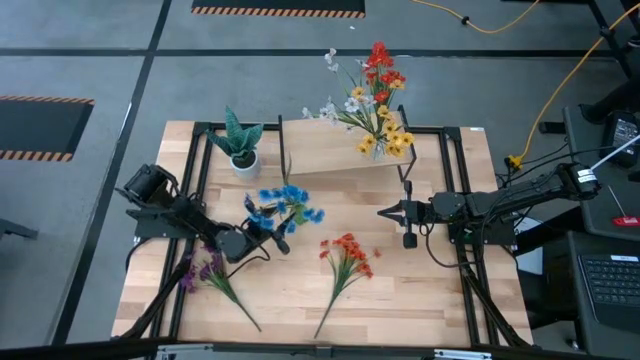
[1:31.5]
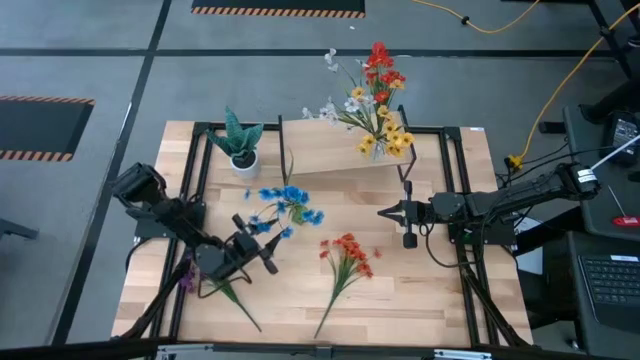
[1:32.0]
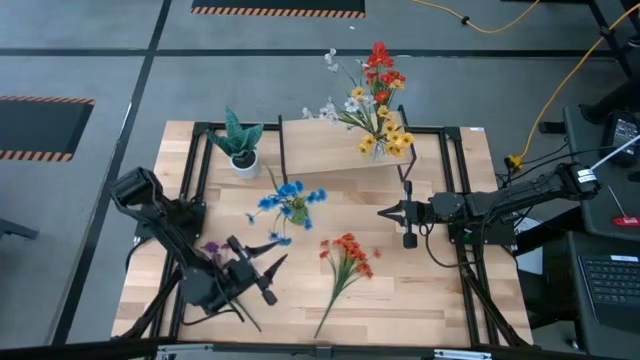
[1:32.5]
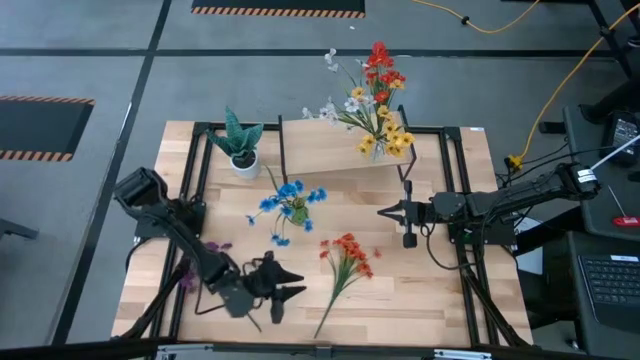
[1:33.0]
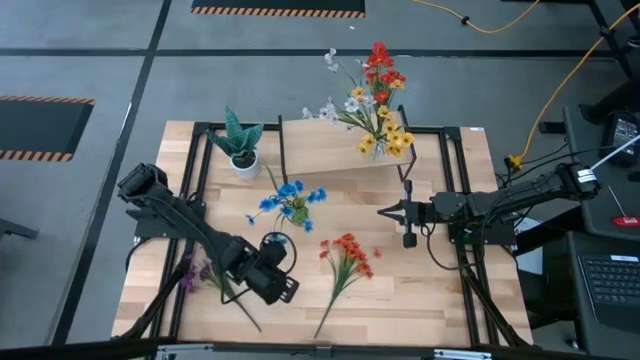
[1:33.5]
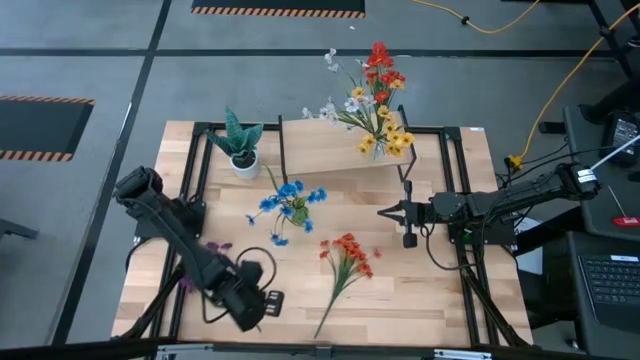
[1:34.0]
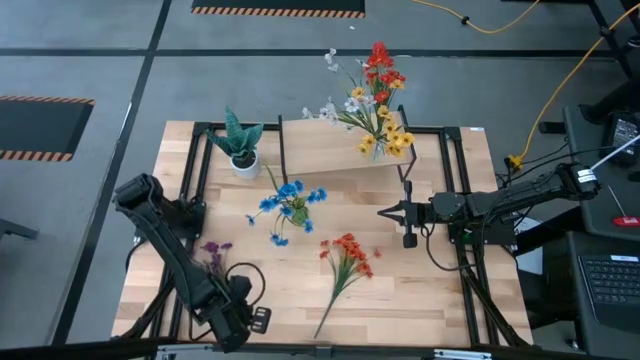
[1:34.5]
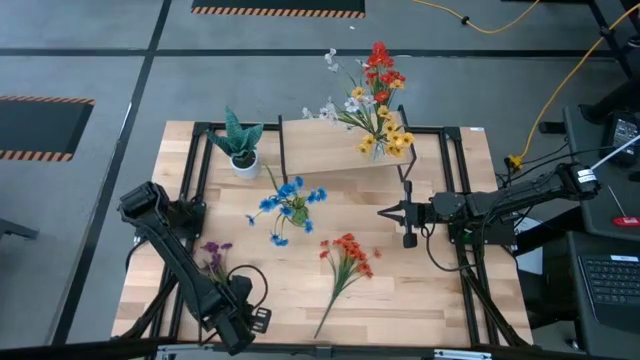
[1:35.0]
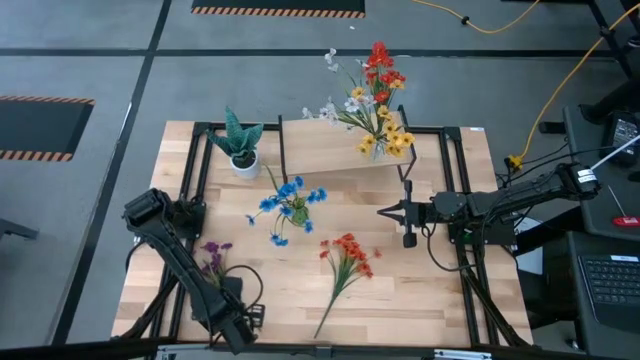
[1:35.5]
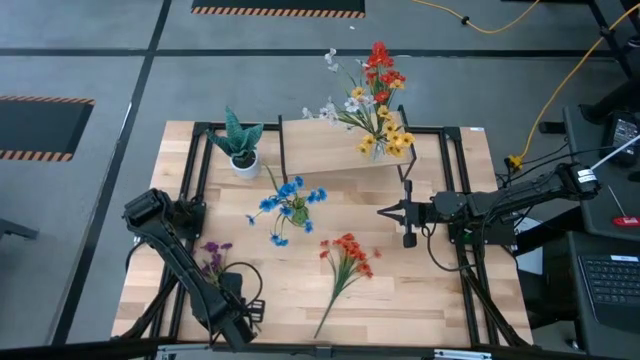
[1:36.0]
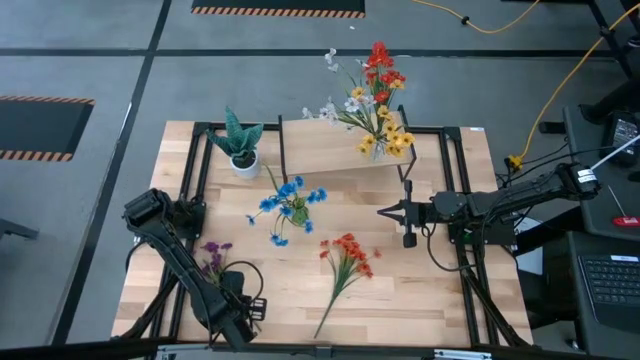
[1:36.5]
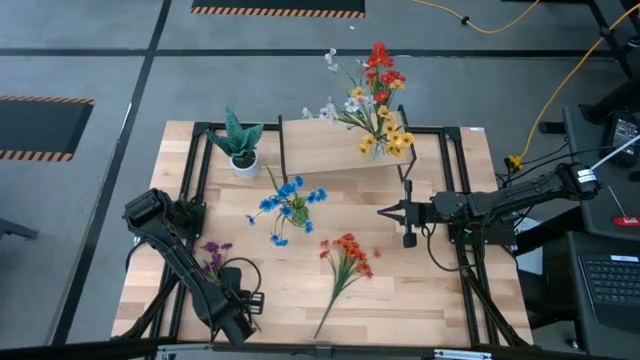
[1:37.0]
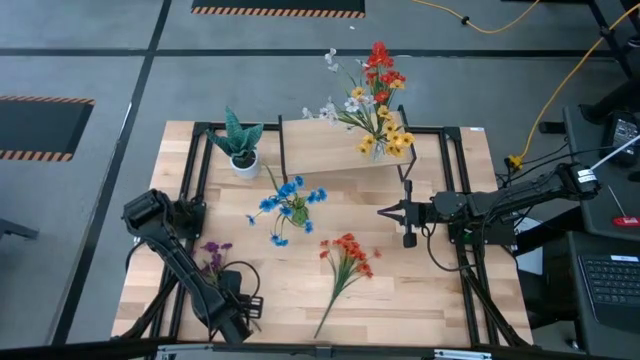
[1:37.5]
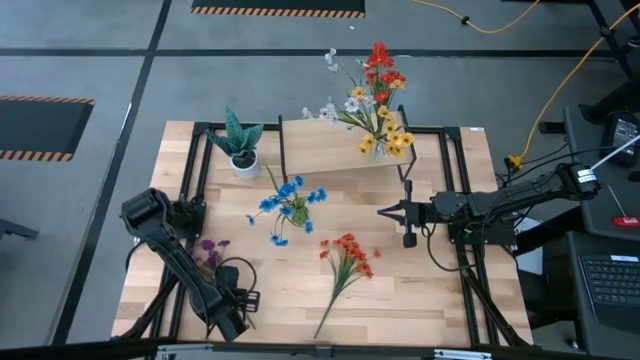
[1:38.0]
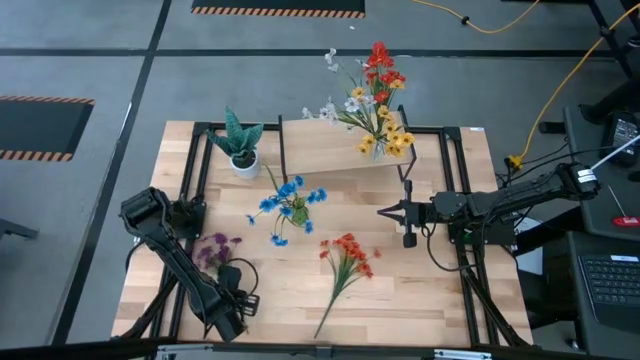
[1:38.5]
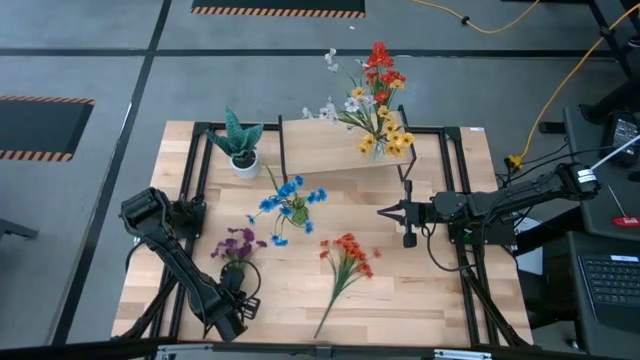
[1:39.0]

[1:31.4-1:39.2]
Task: Pick and place flowers into a vace then onto a shelf
Put the purple flowers into the green transparent vase

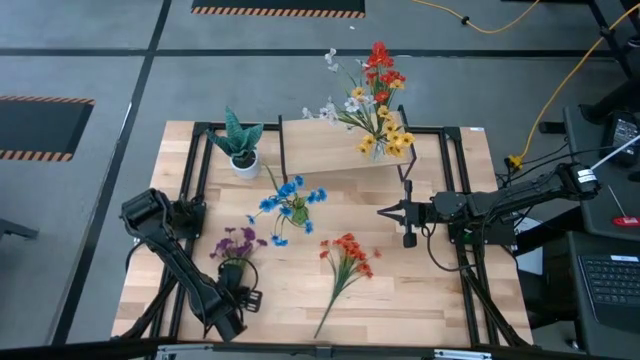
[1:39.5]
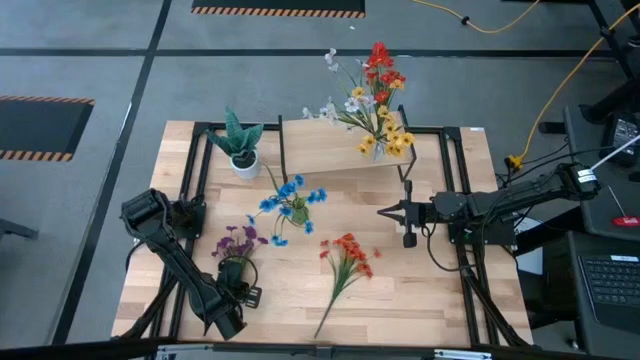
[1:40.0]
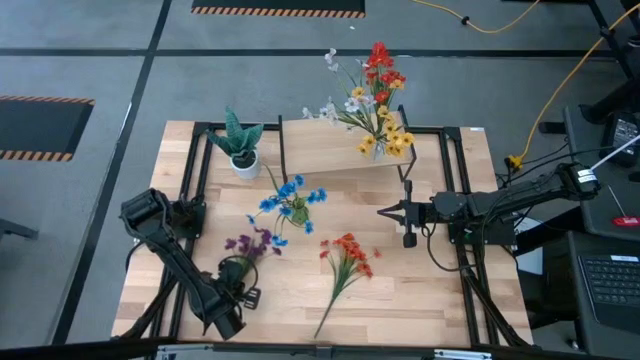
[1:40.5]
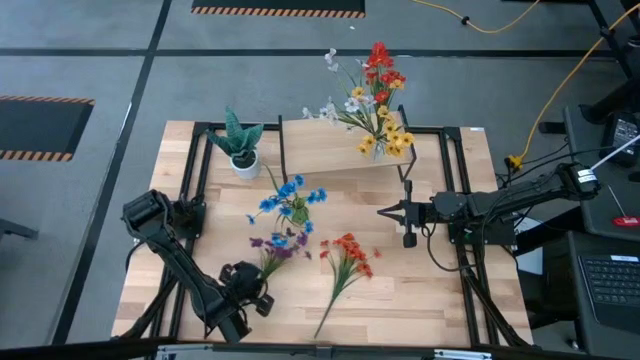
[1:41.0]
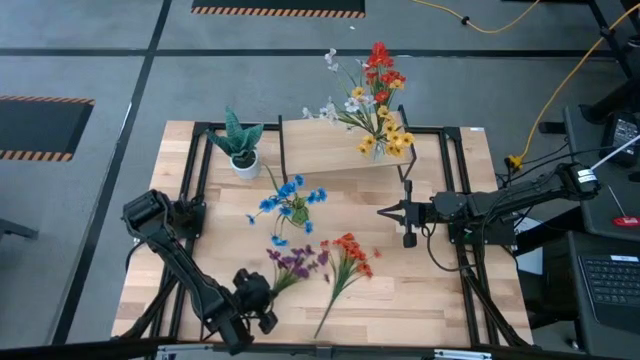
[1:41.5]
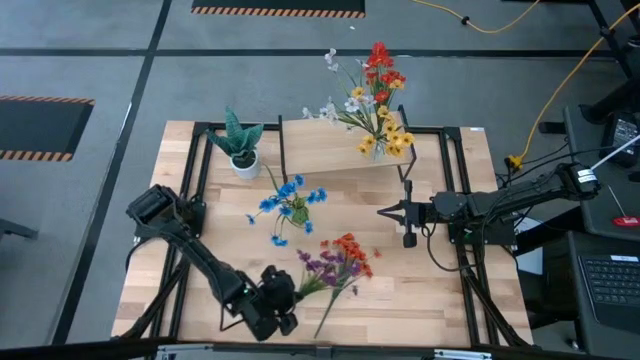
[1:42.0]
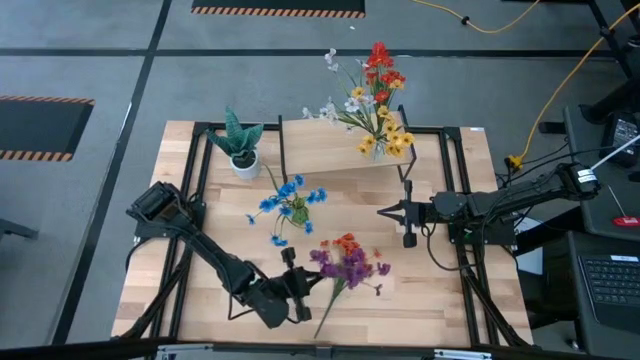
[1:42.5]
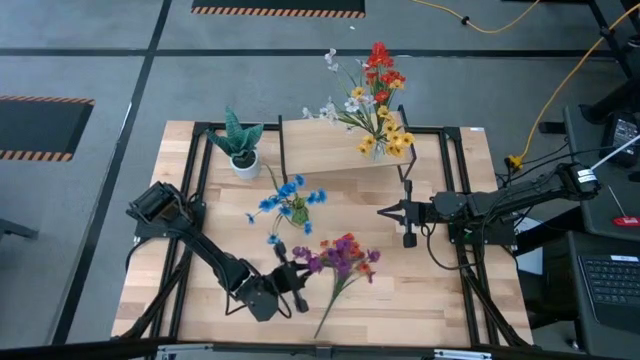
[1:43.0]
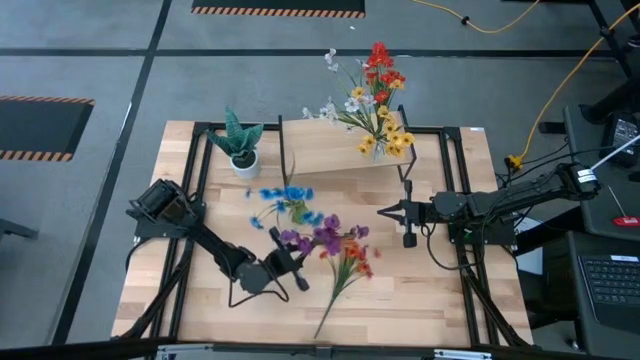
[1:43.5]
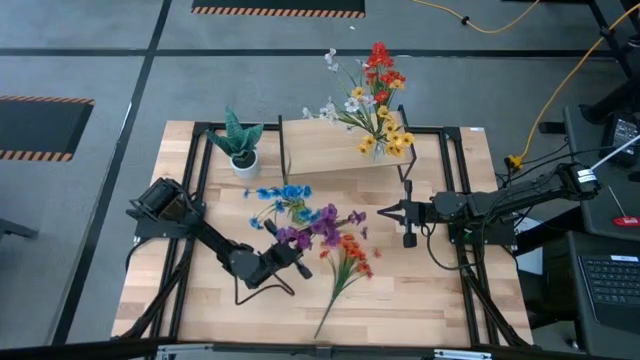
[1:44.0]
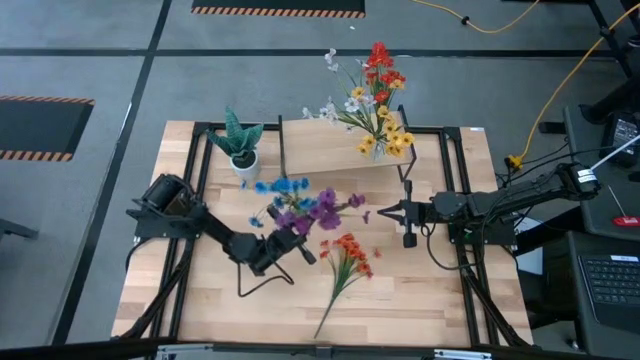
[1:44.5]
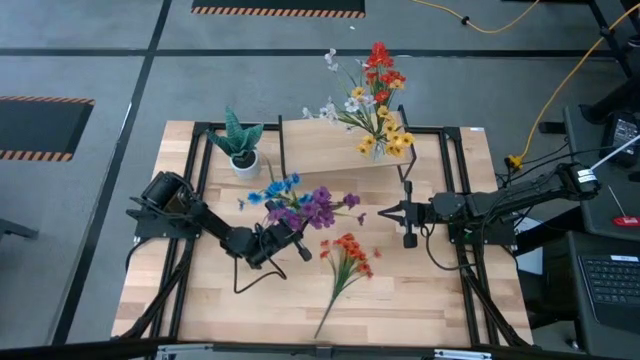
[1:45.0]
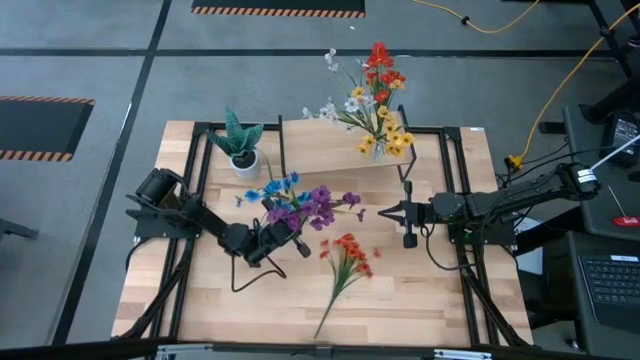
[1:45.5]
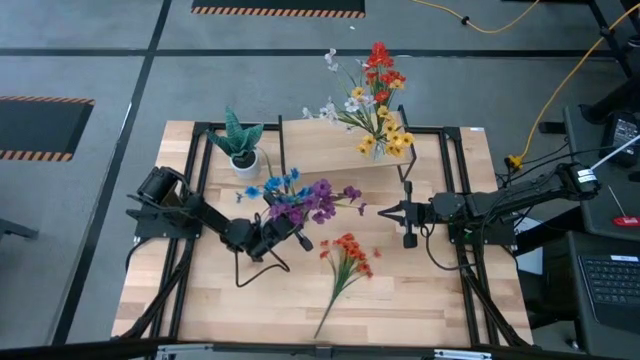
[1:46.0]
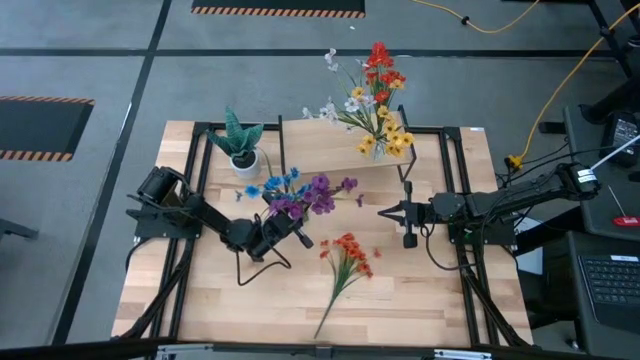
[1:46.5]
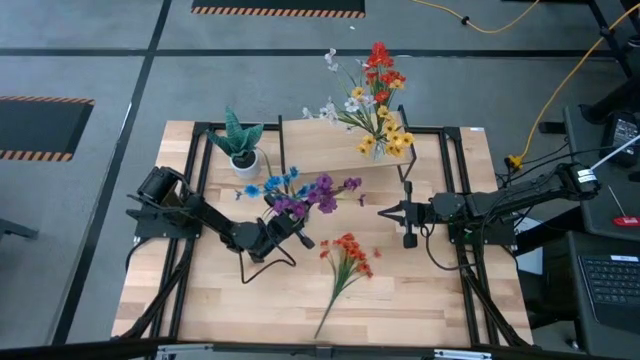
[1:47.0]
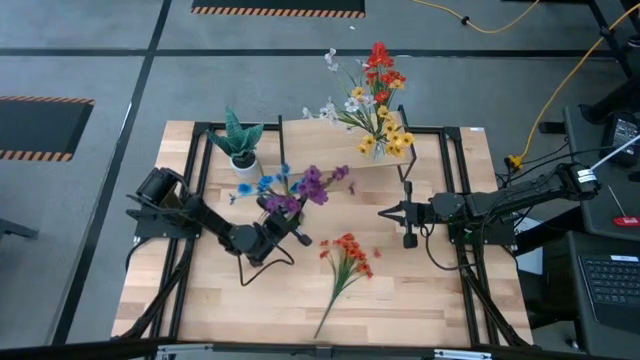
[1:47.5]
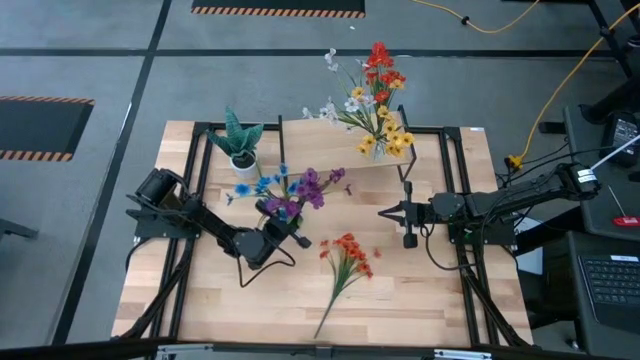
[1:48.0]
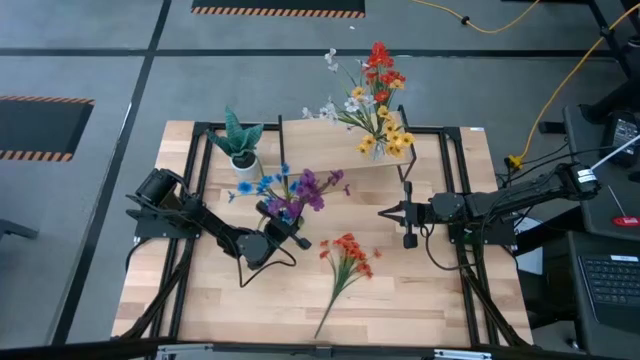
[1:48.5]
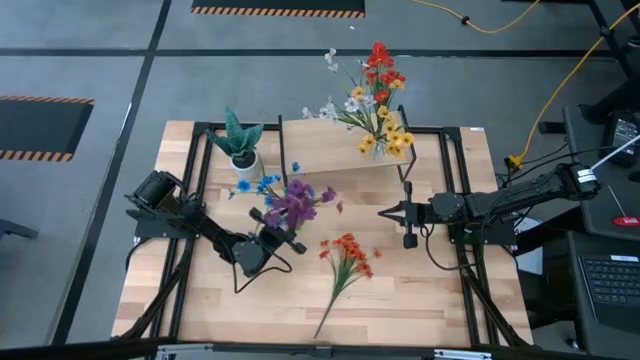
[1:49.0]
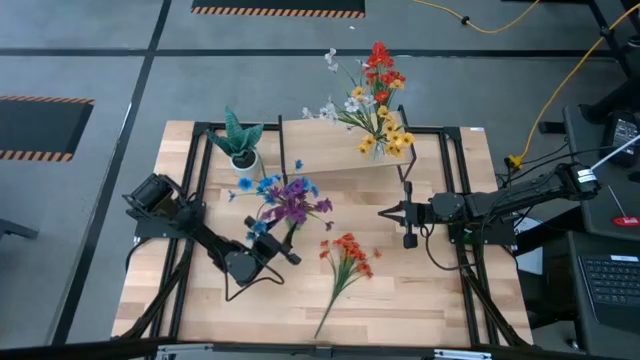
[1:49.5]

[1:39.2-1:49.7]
Put the purple flowers into the green transparent vase

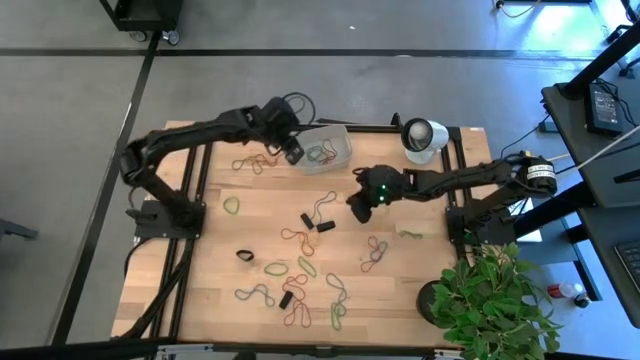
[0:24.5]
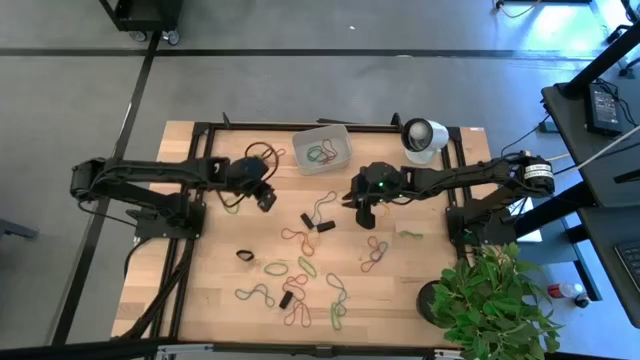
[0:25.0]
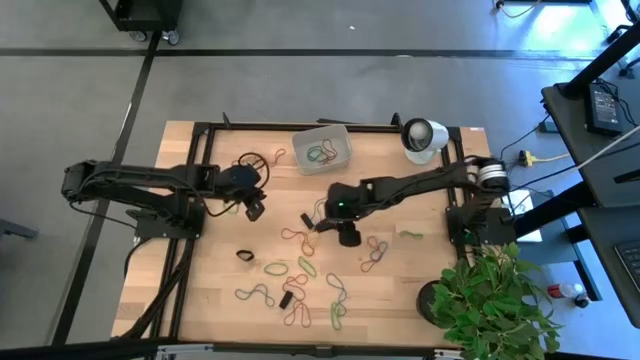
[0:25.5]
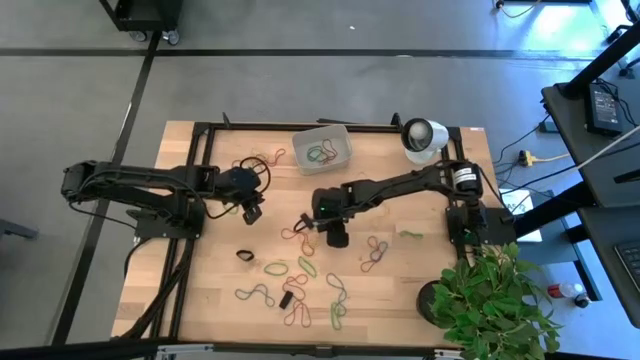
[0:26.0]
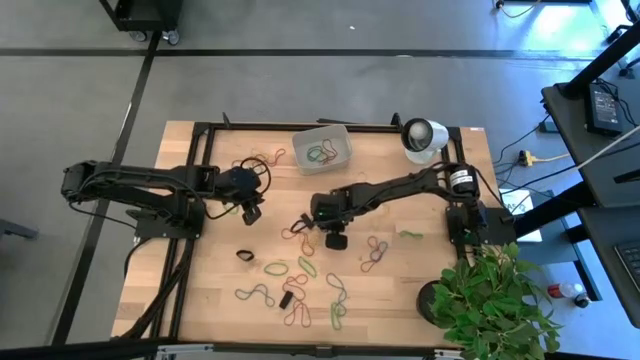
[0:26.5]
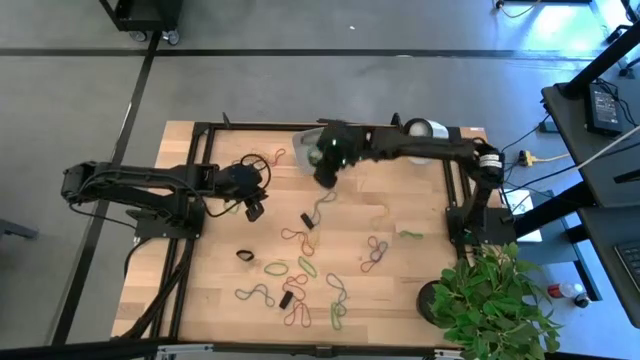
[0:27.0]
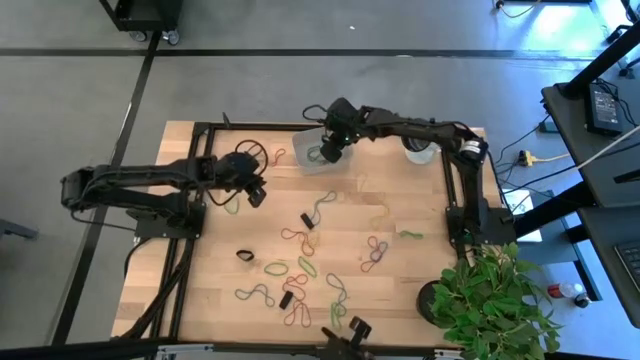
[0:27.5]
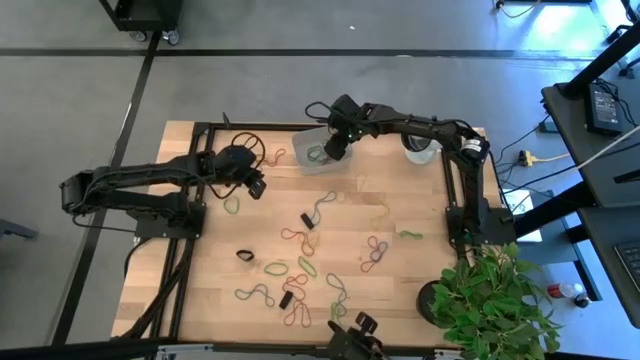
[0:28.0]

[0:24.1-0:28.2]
Task: Pick and place rubber bands into bin
Put the black rubber band into the gray bin
